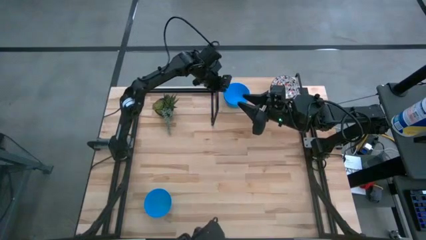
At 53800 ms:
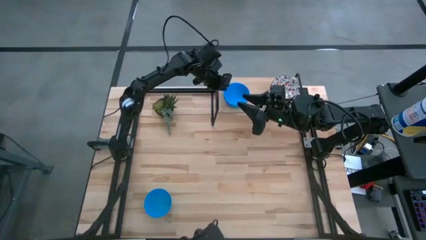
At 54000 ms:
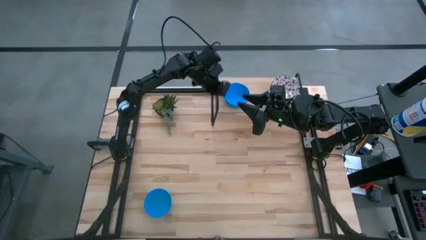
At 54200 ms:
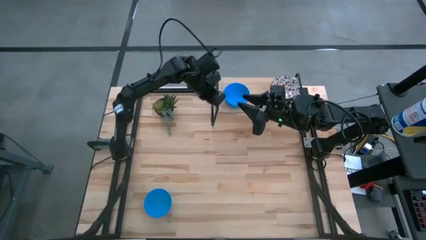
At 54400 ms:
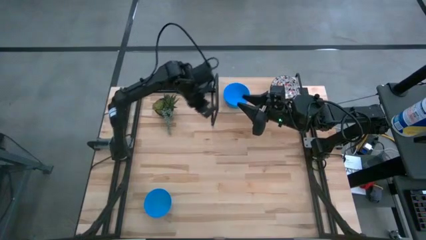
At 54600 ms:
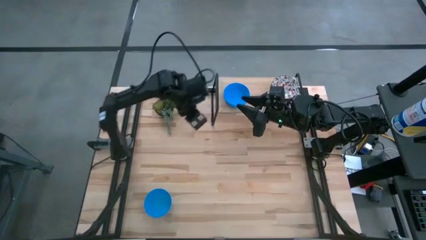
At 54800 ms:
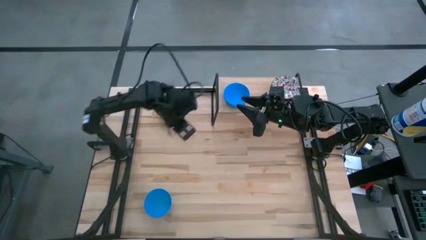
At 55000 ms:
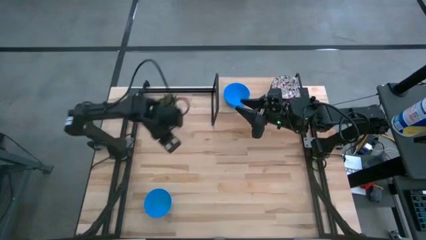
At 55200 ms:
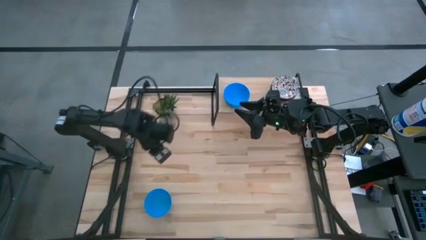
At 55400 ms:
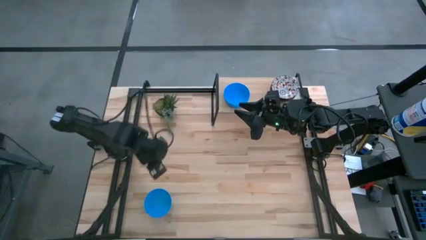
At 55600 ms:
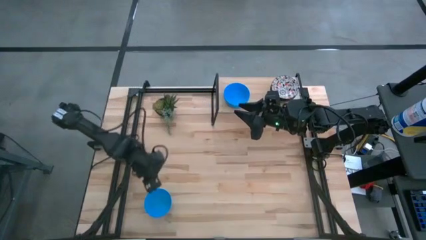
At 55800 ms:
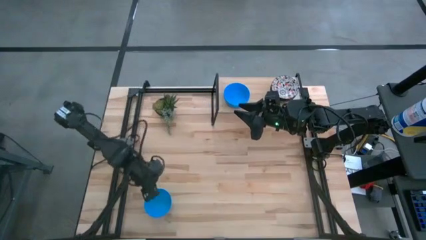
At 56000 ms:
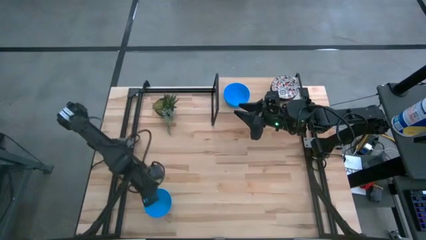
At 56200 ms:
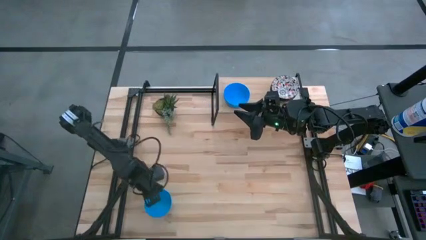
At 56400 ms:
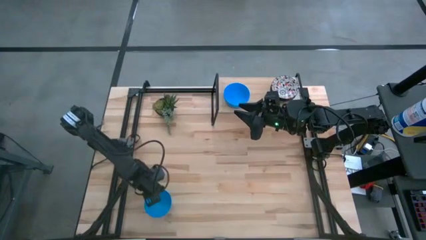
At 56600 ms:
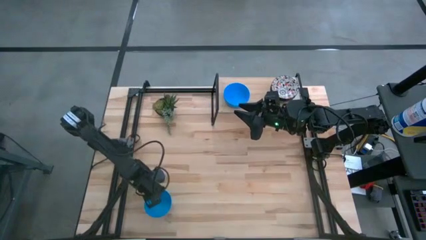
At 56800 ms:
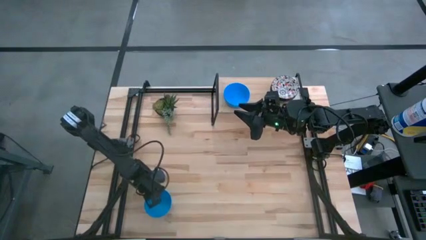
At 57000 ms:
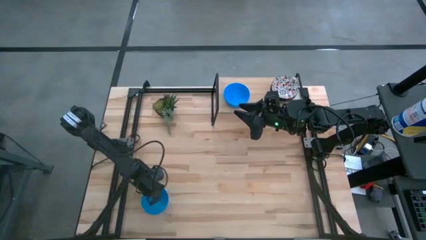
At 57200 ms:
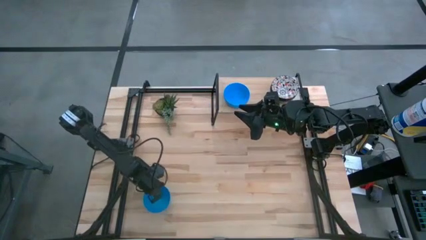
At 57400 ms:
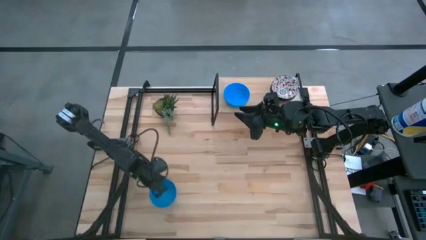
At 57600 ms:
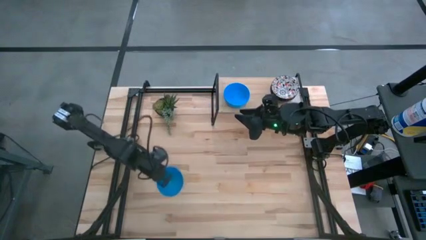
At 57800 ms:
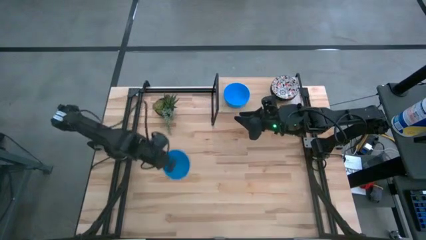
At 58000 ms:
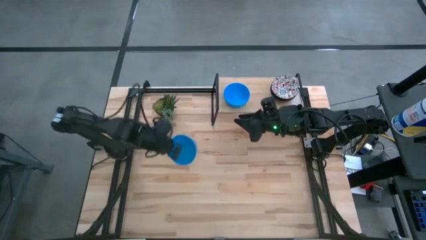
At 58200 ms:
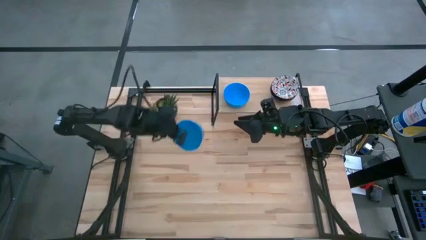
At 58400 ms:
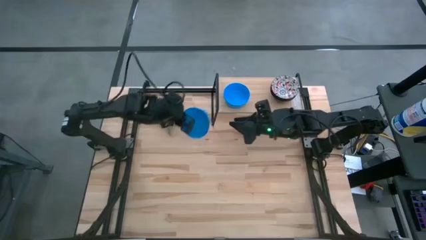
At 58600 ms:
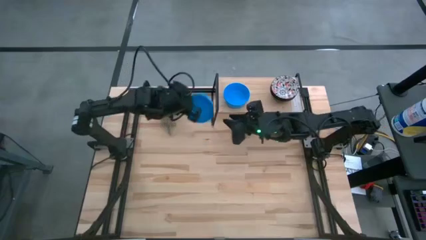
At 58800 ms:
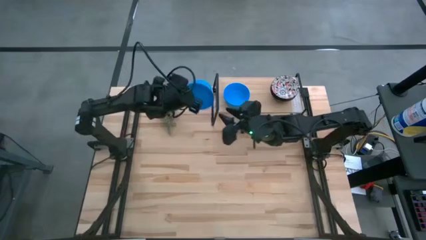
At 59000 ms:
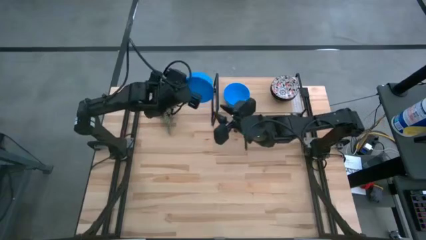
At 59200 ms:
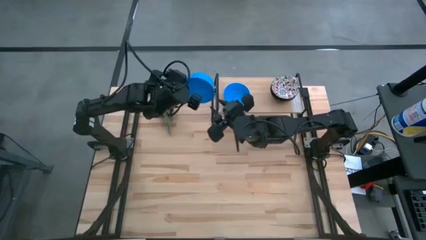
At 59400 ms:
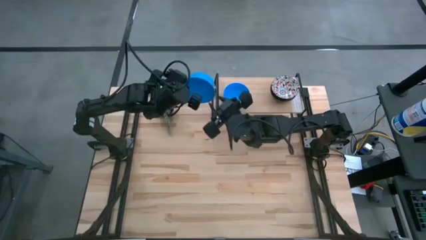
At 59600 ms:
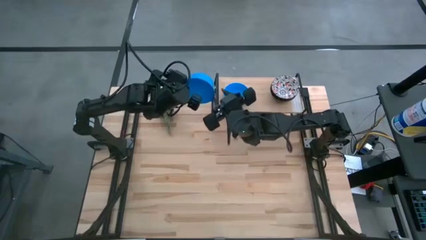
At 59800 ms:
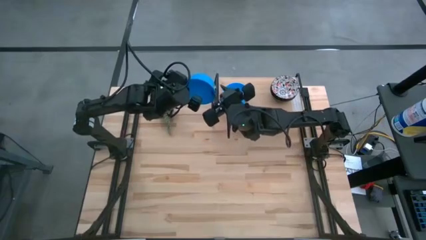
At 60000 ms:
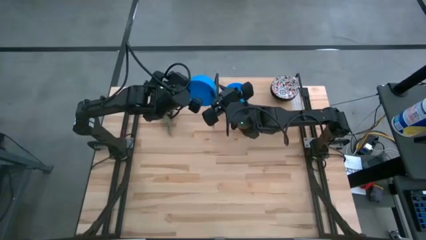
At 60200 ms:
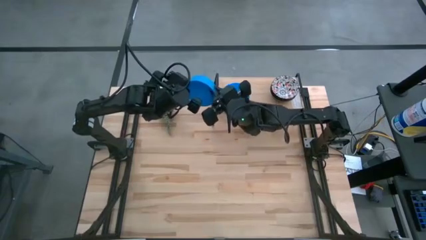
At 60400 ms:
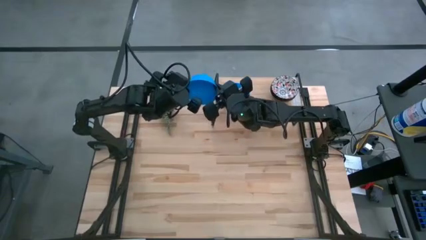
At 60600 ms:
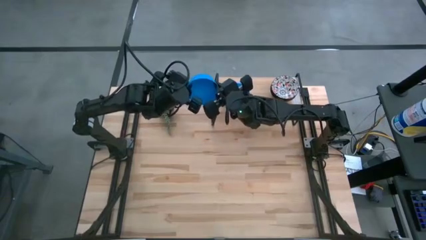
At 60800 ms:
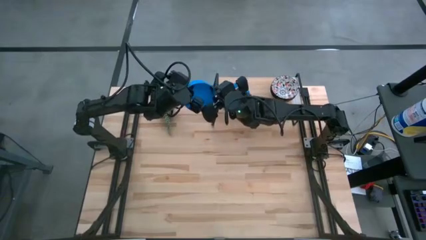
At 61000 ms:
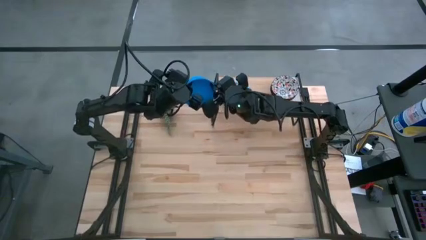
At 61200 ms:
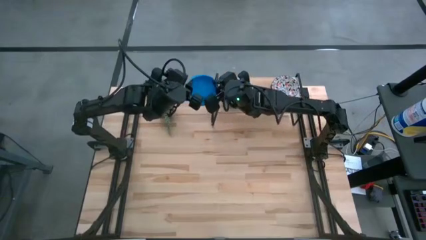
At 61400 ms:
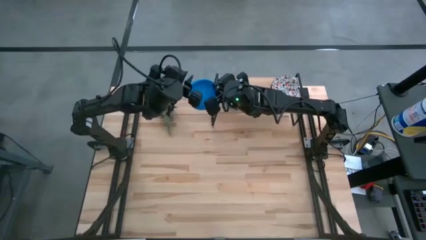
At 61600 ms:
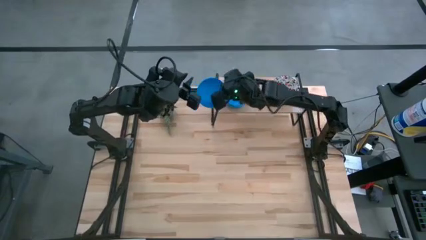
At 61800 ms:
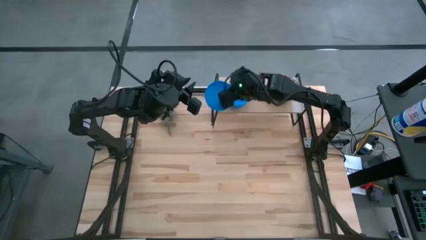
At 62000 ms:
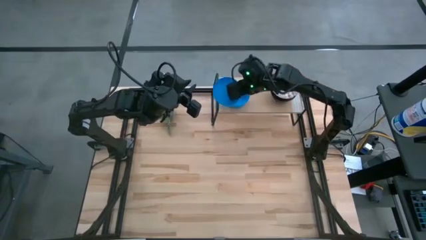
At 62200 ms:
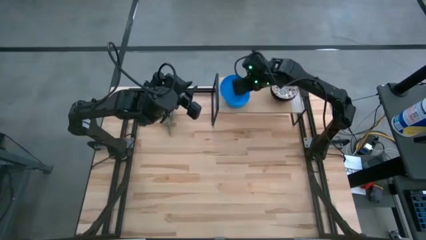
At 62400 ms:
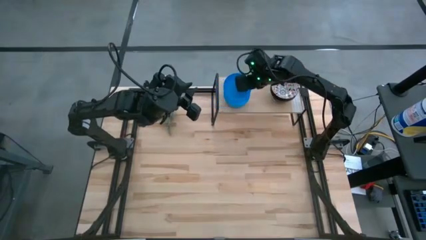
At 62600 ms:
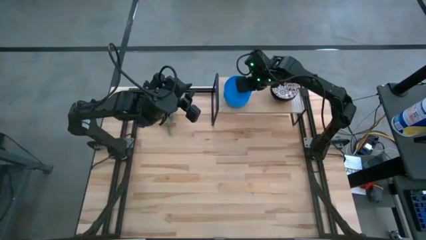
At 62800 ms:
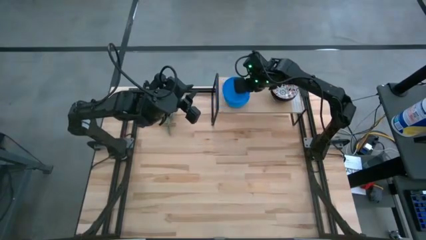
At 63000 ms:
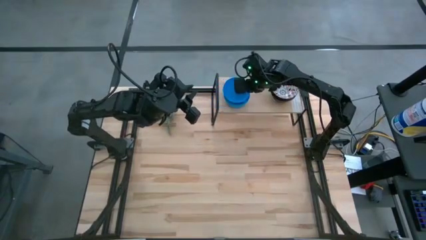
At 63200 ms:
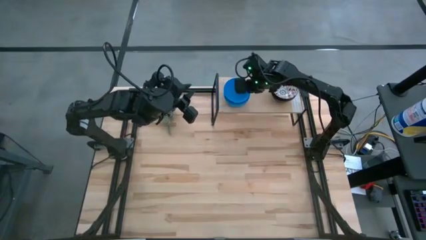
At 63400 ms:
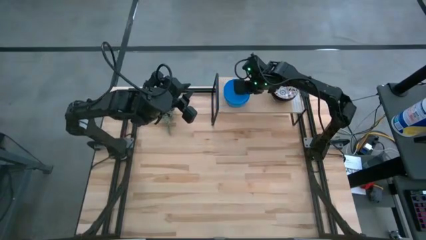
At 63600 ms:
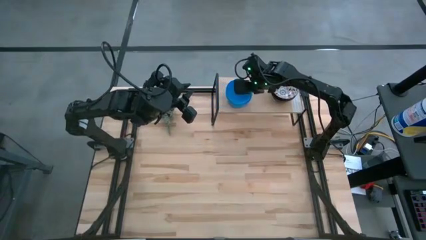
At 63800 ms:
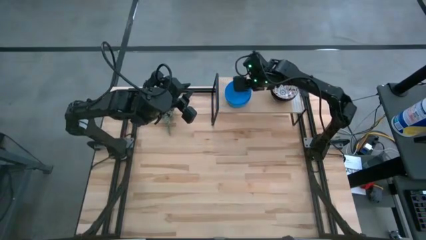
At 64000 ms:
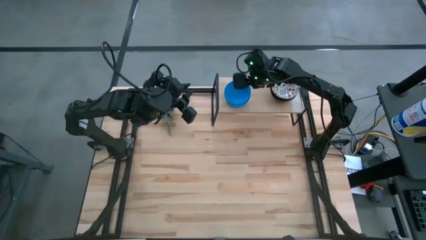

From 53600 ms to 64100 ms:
Task: Pick & Place Mini bowls
Stack the blue bowl on top of the other blue bowl on the shelf

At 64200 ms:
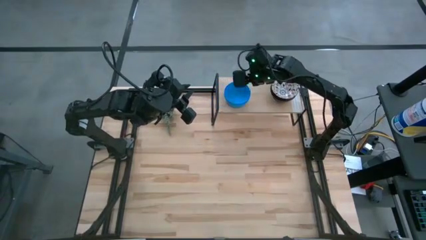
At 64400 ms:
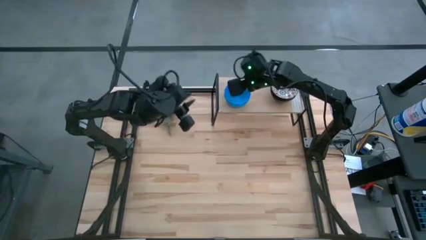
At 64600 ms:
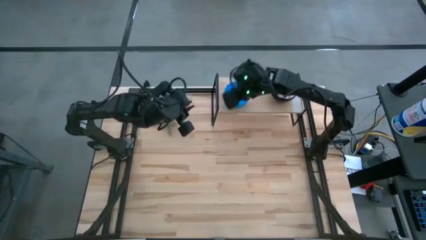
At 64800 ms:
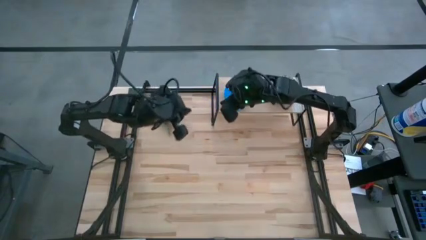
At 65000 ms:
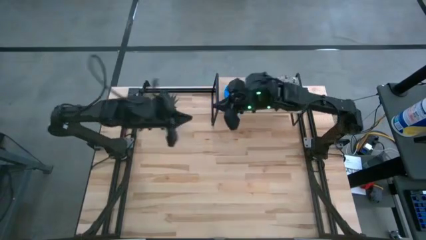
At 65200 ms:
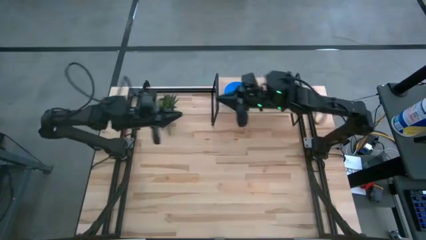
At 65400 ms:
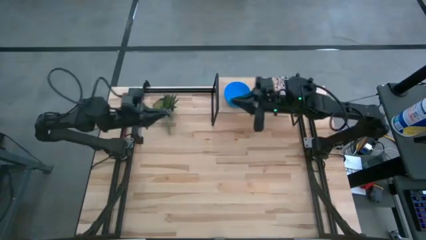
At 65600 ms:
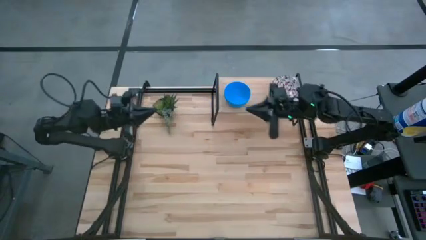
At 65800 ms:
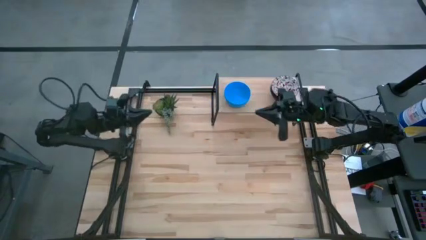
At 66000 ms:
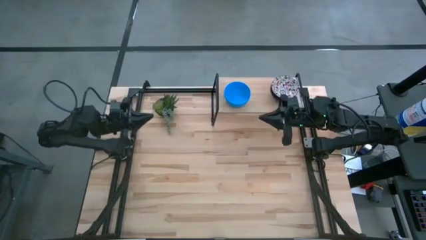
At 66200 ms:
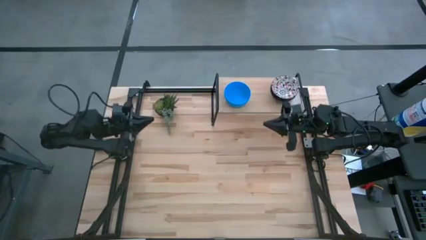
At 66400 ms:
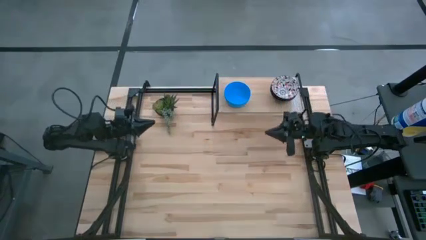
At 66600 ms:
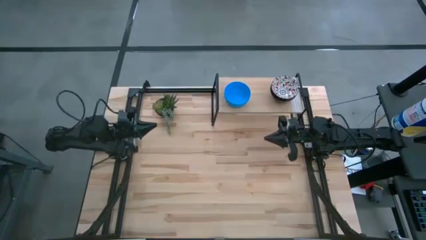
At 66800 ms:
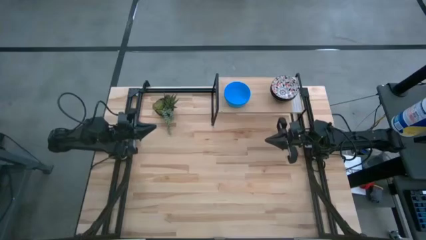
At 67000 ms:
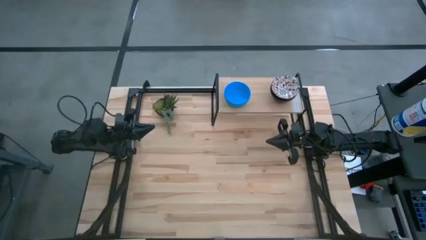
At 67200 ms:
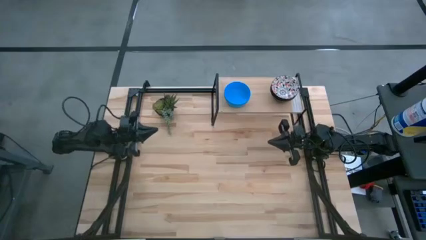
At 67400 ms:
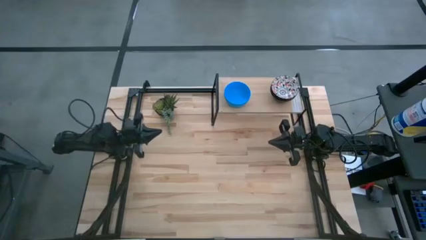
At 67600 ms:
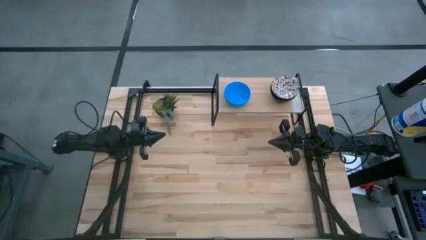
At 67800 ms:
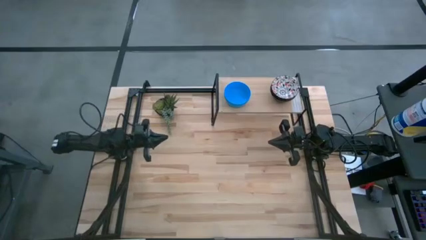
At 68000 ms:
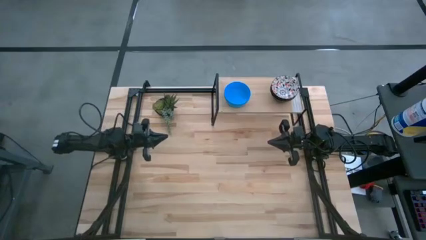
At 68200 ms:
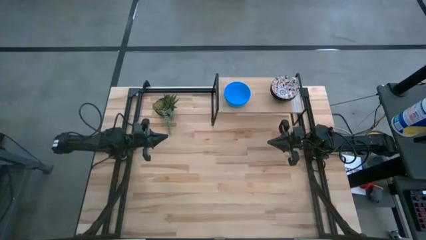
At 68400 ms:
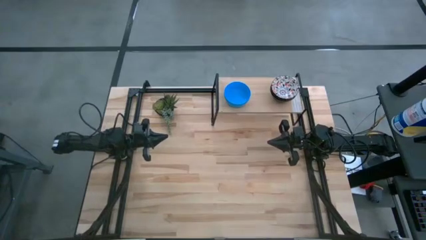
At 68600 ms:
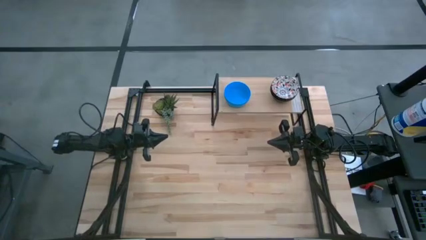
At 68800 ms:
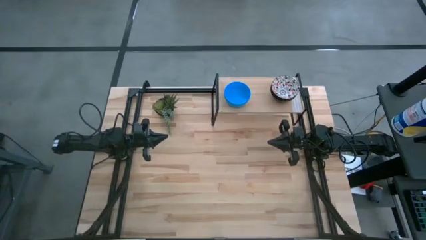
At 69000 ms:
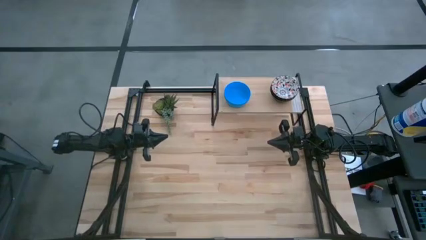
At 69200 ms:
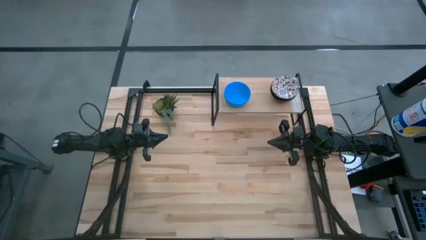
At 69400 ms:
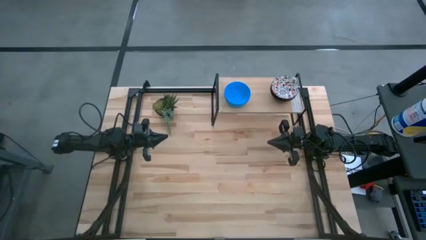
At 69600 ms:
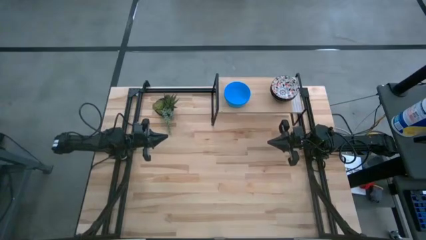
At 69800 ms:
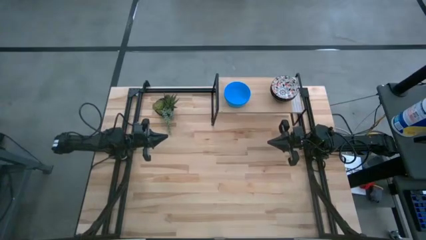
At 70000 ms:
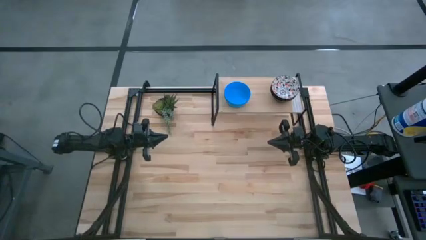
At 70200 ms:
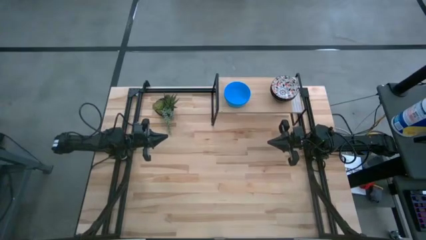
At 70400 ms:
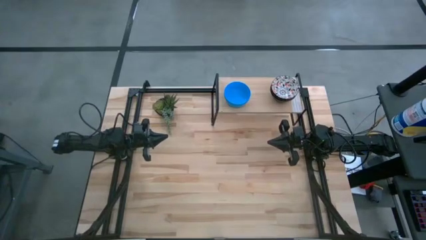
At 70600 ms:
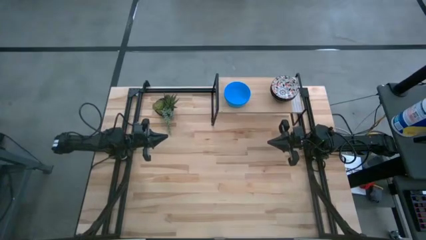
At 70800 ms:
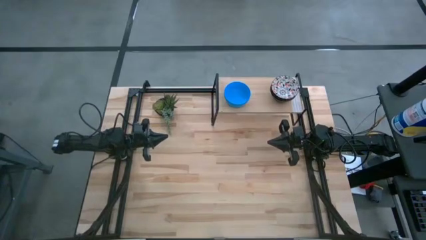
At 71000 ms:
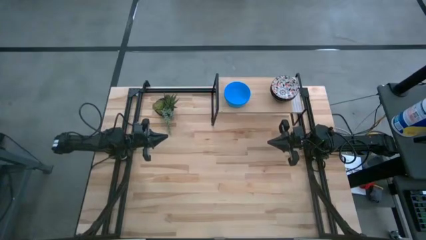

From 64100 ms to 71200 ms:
Return to Home Position
